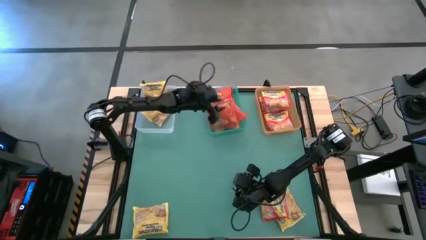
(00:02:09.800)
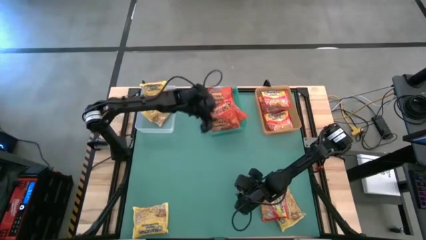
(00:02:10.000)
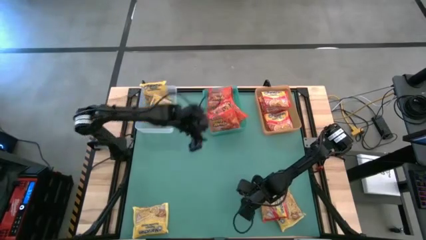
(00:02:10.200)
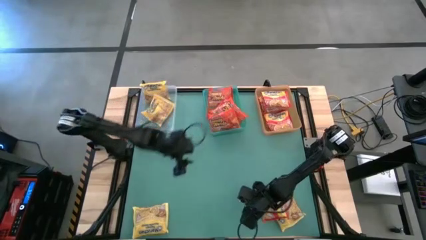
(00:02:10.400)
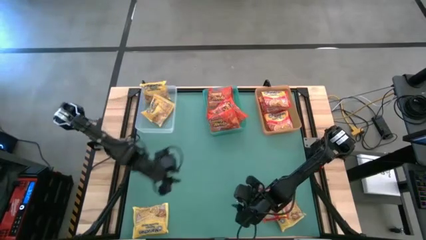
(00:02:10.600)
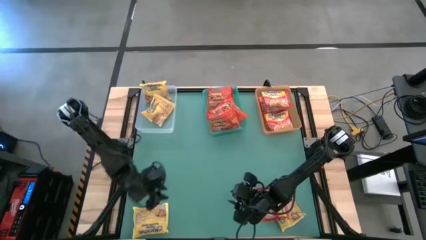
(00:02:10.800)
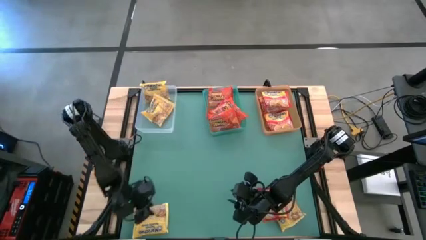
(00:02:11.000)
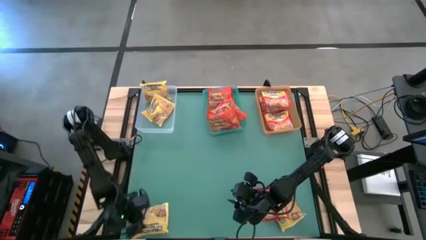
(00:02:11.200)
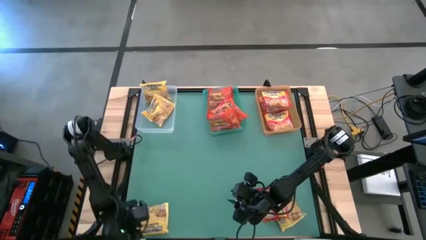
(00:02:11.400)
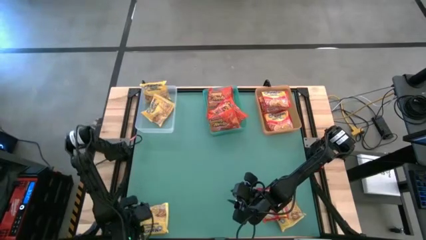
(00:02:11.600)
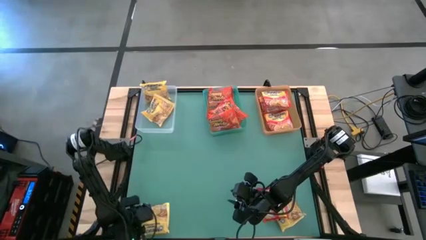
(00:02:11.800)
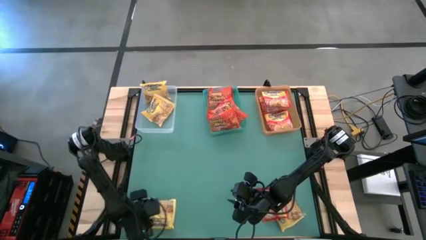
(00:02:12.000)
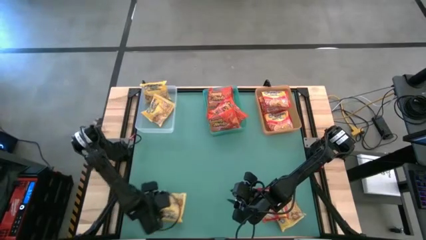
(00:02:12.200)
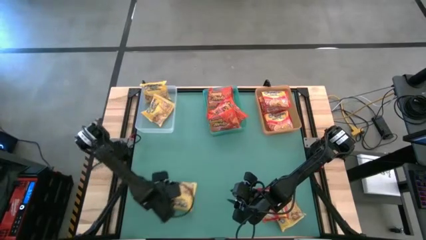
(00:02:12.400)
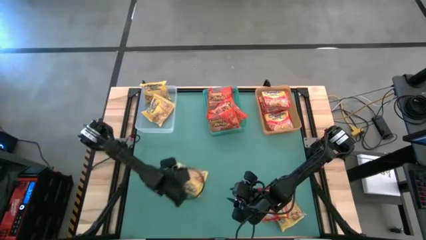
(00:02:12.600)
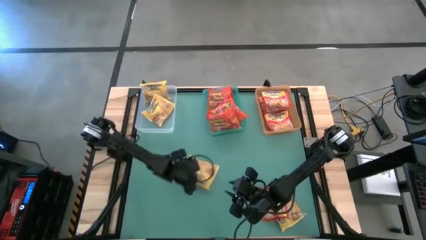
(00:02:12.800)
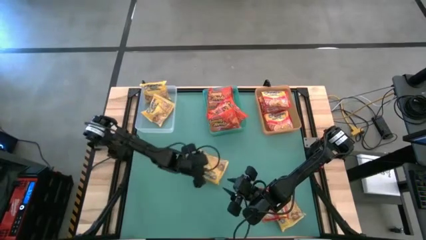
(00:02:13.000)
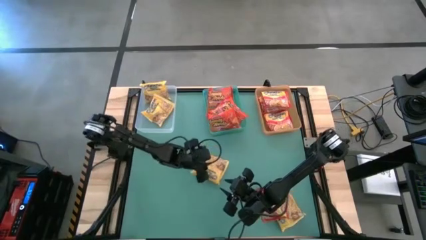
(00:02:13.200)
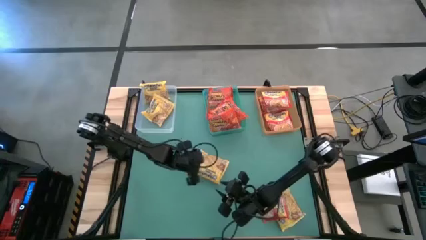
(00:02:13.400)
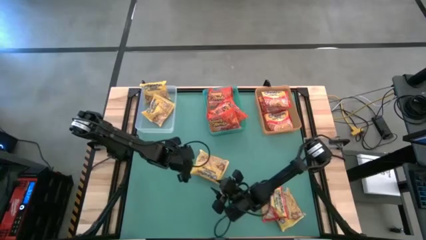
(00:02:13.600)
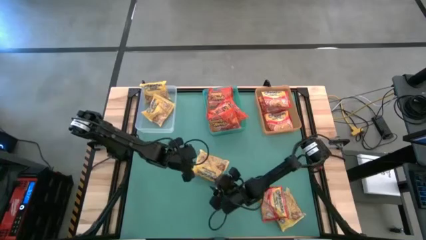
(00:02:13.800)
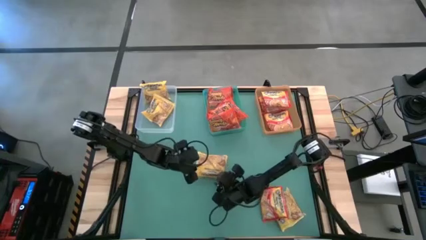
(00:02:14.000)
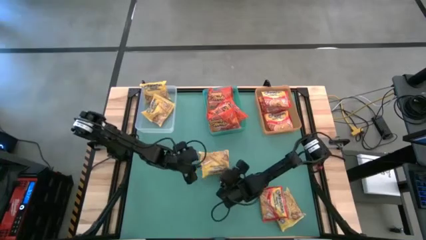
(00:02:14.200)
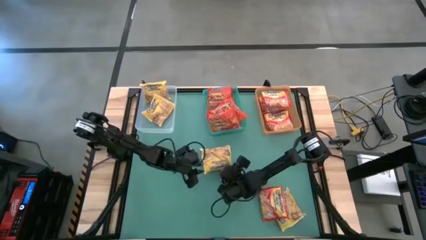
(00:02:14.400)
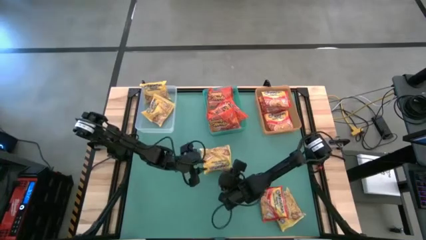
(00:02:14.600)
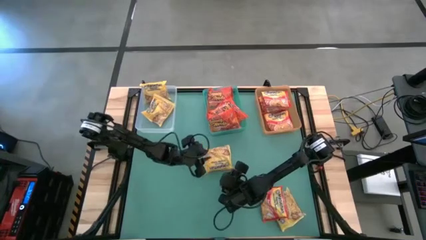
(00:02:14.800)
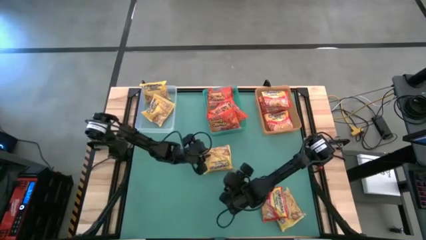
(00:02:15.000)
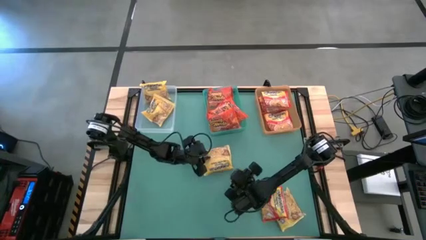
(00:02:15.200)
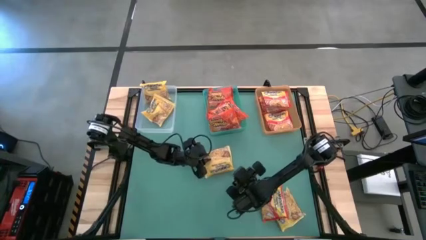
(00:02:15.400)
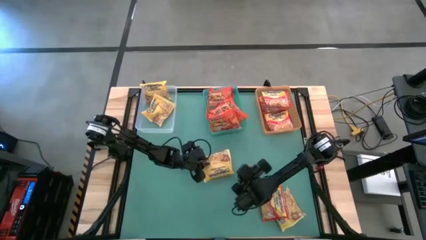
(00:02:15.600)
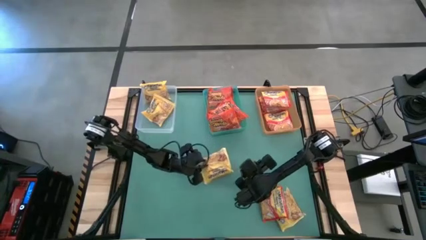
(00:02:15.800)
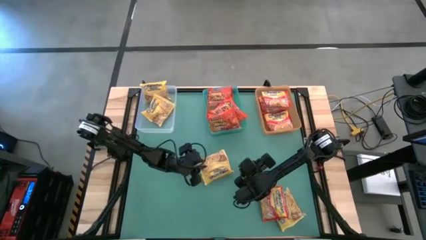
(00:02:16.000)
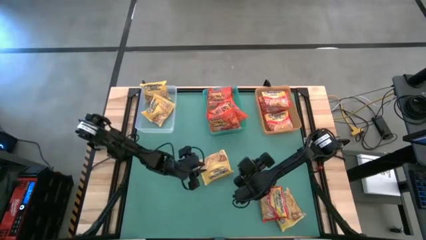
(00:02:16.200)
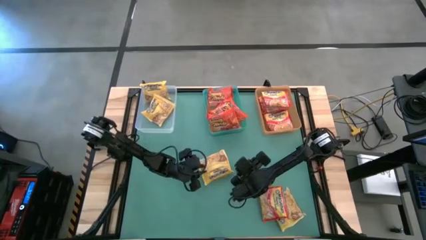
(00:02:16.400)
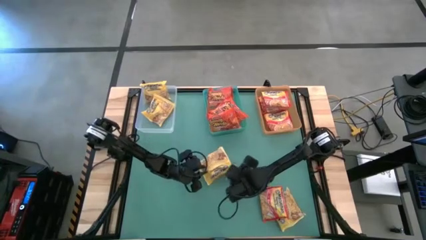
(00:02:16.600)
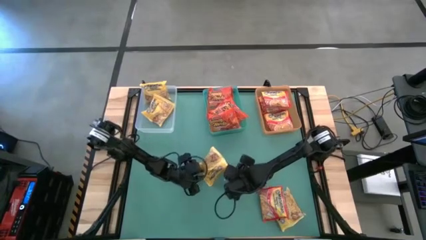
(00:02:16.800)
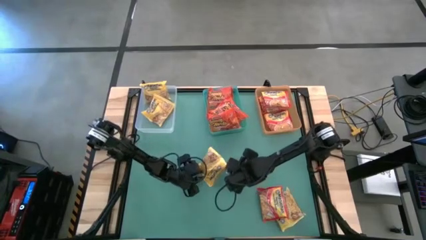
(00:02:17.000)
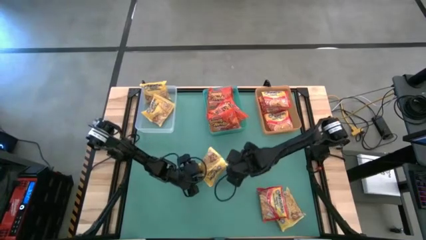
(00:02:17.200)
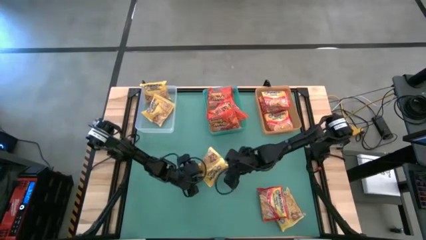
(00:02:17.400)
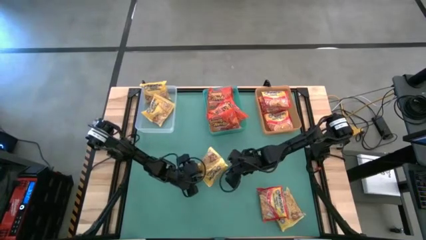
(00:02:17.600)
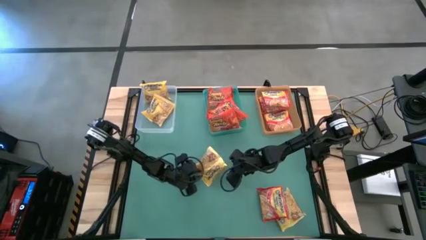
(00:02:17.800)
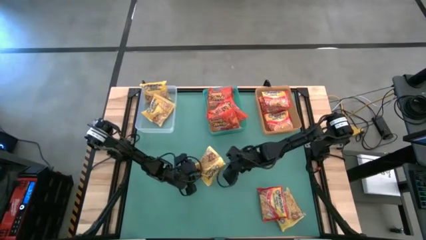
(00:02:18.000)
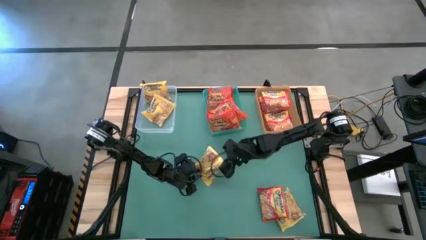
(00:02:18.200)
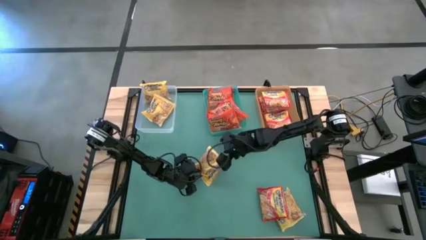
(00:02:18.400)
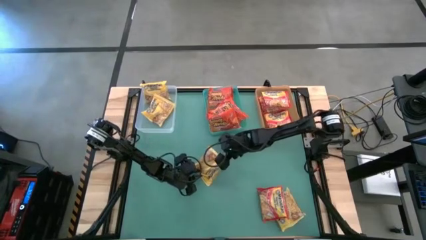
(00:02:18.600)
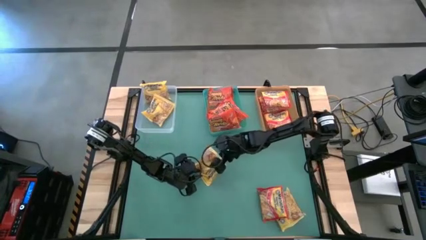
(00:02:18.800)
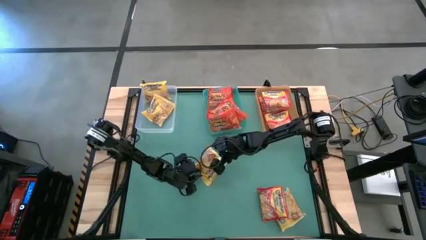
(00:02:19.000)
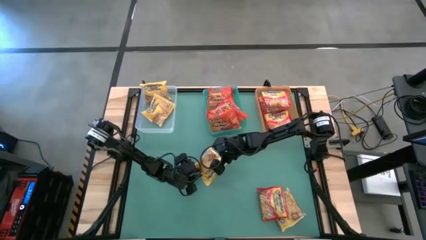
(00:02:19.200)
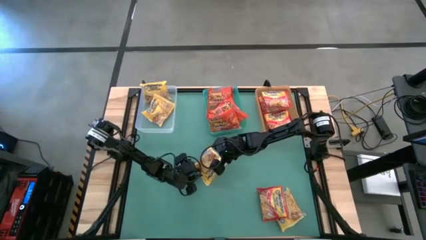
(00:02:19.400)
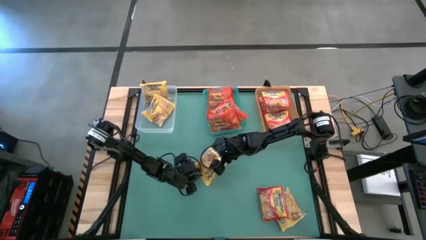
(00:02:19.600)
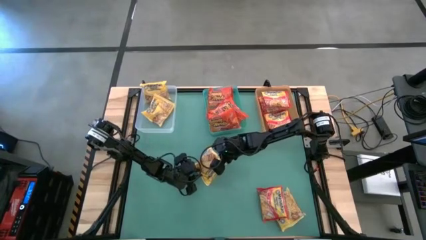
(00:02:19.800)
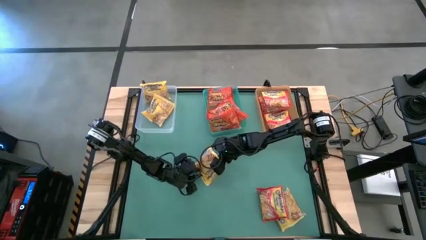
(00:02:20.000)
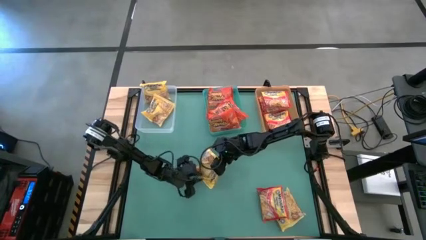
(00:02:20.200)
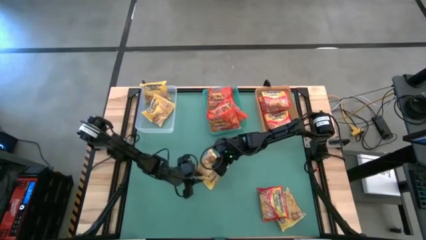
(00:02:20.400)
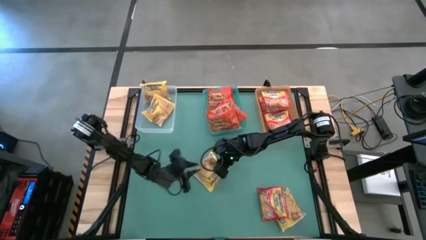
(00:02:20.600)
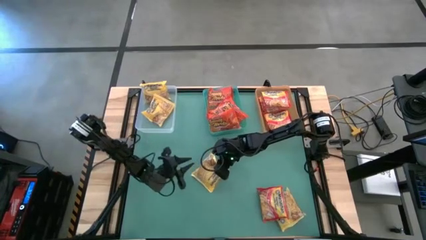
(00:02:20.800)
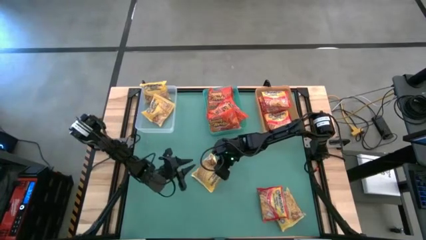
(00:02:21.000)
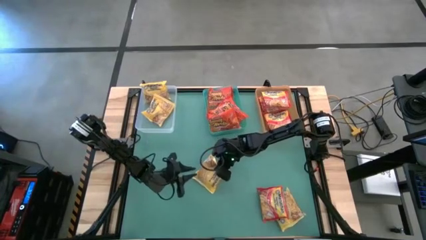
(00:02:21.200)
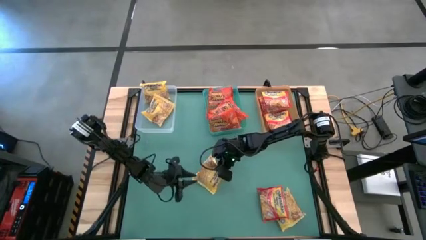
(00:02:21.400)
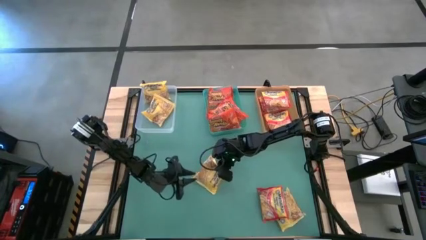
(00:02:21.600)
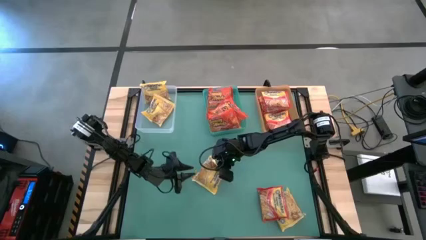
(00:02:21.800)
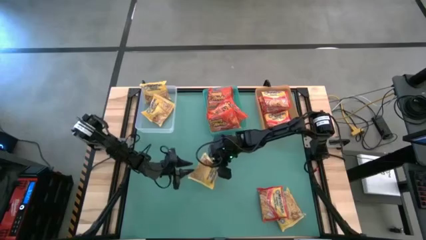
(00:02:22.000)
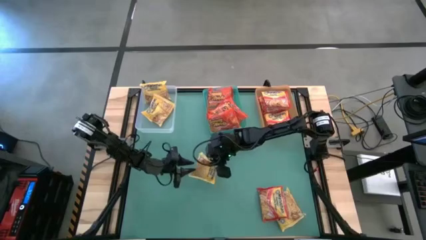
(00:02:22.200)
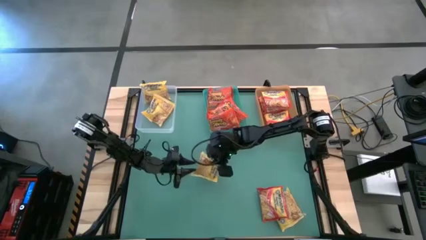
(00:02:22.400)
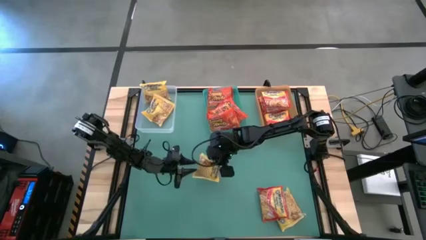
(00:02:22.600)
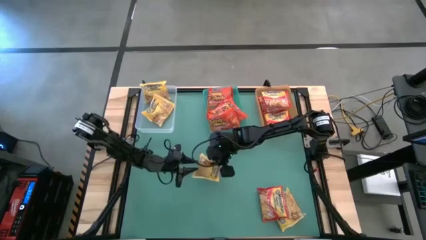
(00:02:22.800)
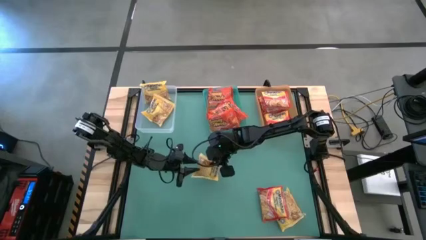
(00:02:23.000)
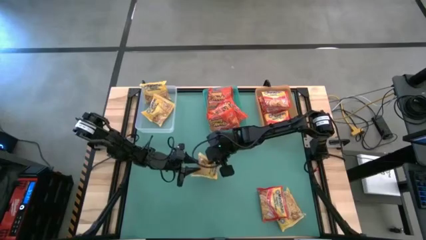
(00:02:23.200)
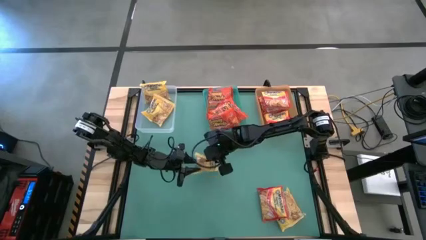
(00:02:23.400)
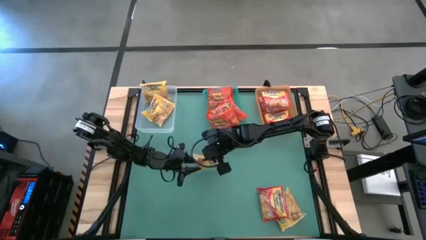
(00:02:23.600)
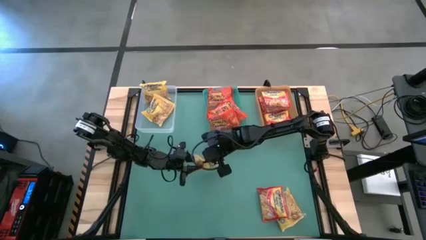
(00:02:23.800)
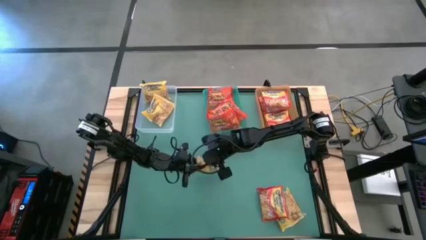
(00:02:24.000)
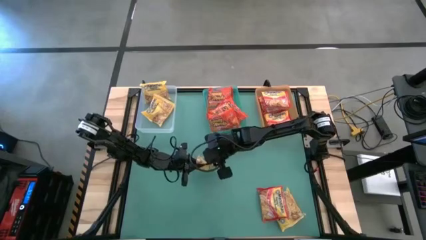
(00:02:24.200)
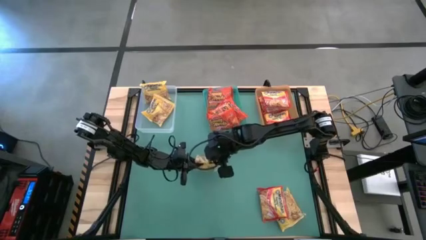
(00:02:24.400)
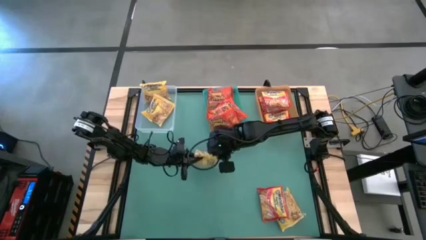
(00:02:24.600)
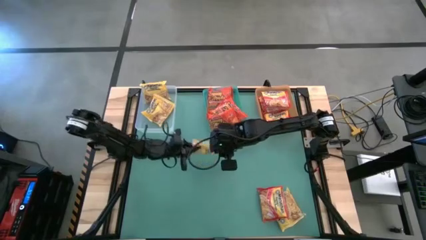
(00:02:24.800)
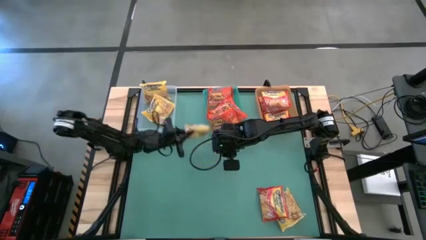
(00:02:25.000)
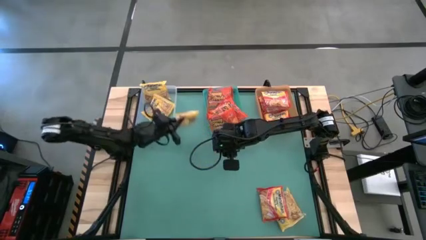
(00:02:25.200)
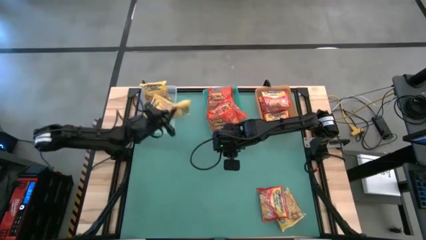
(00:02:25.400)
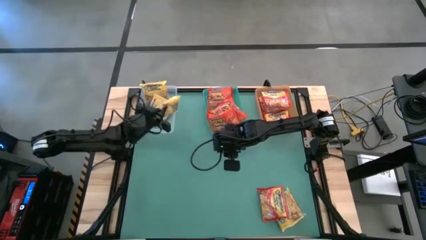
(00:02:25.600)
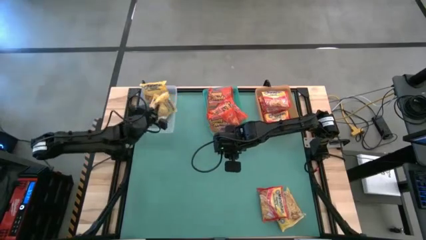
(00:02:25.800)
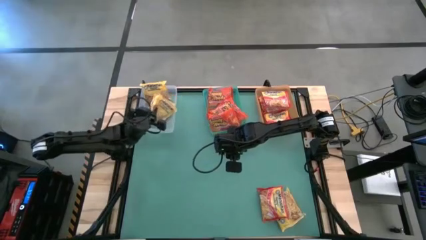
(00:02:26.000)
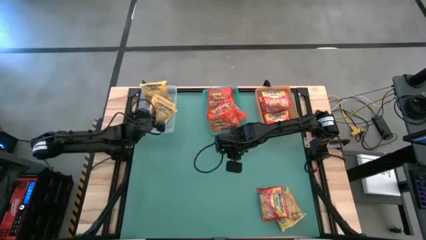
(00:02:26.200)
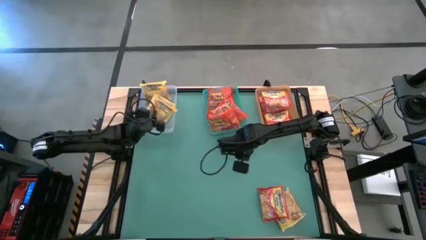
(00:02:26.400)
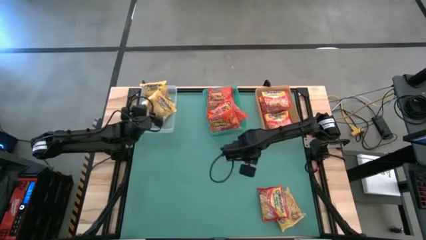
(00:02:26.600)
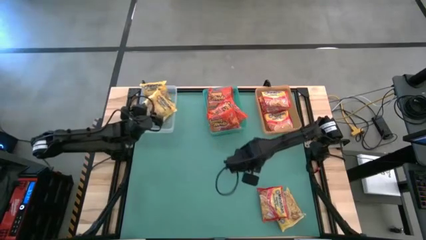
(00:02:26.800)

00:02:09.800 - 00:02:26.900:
Task: Sort Maruchan noodles
Put the yellow noodle pack into the transparent bin
